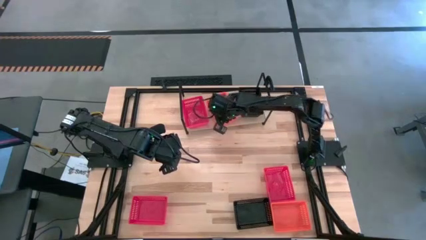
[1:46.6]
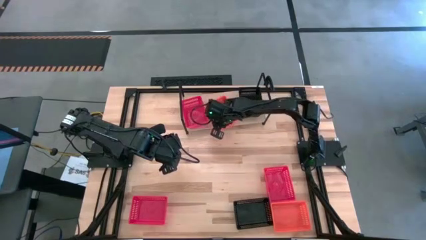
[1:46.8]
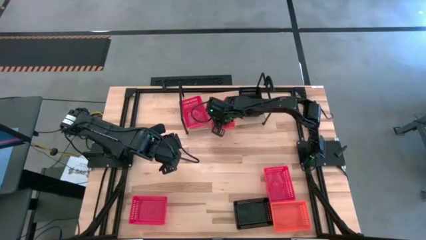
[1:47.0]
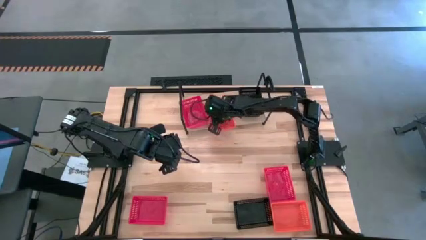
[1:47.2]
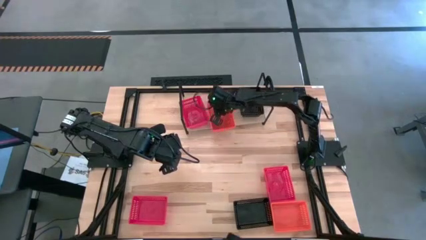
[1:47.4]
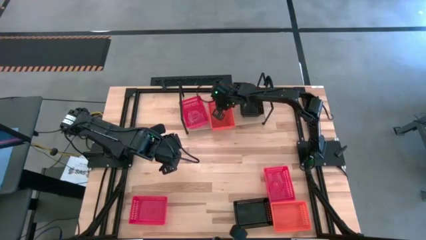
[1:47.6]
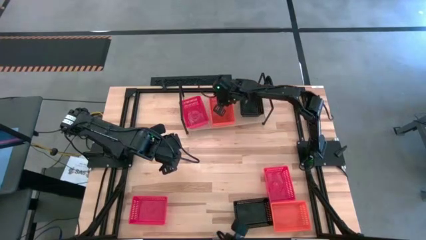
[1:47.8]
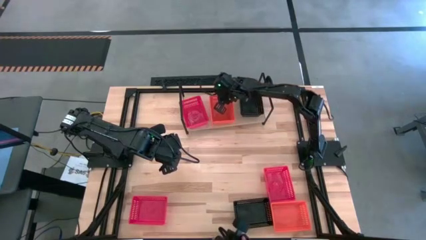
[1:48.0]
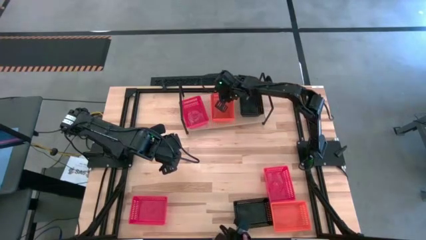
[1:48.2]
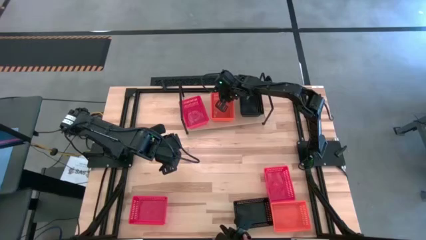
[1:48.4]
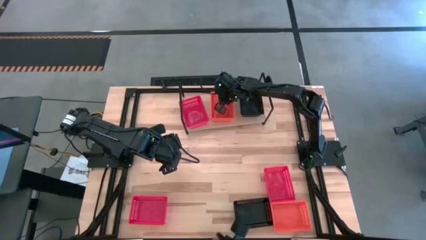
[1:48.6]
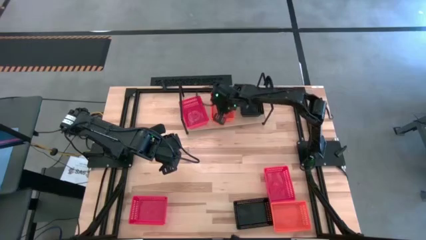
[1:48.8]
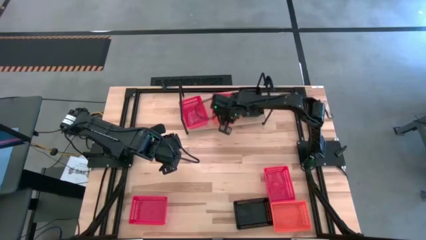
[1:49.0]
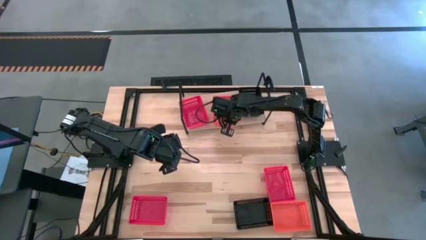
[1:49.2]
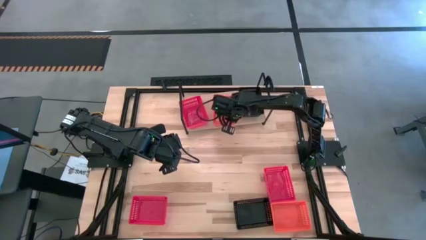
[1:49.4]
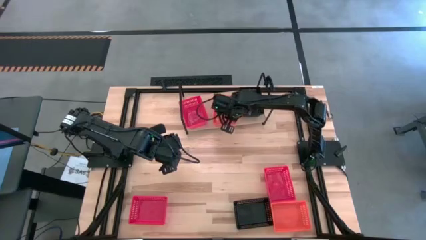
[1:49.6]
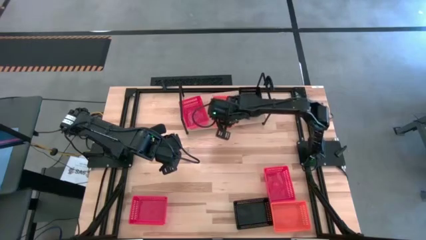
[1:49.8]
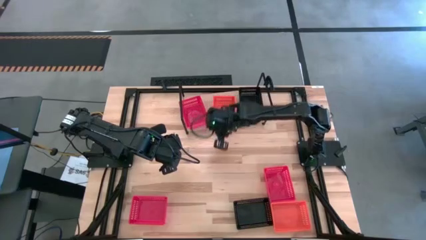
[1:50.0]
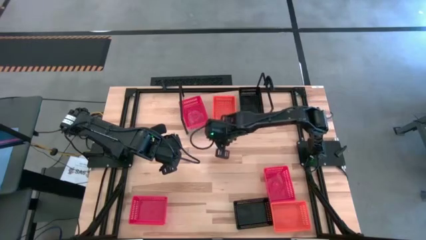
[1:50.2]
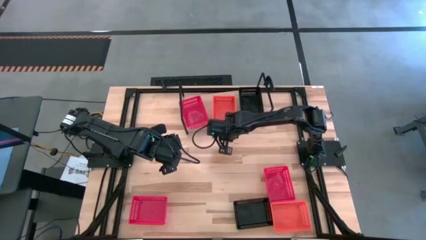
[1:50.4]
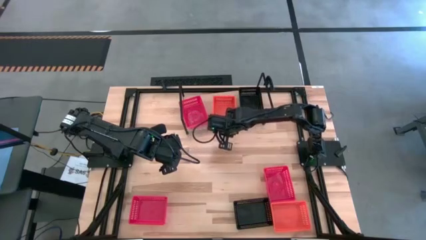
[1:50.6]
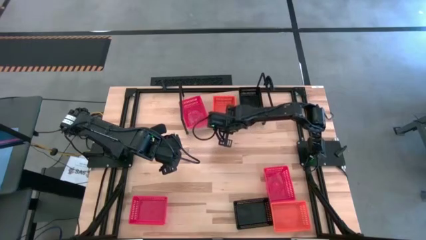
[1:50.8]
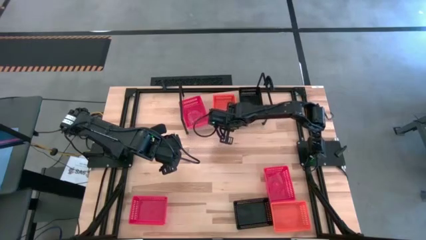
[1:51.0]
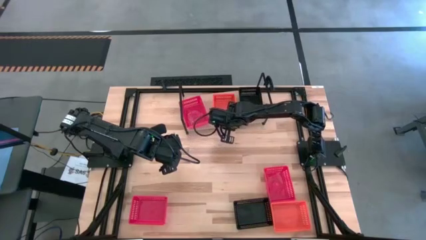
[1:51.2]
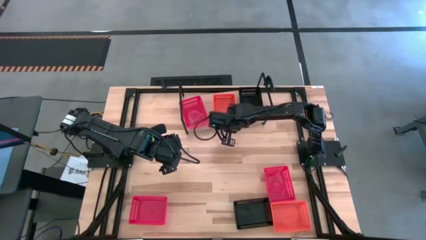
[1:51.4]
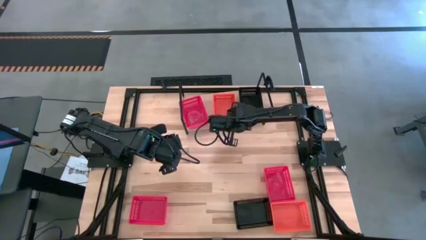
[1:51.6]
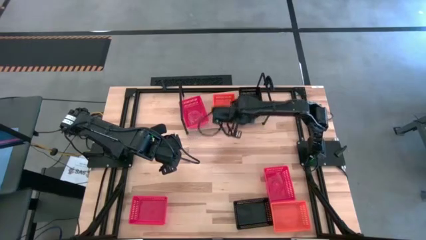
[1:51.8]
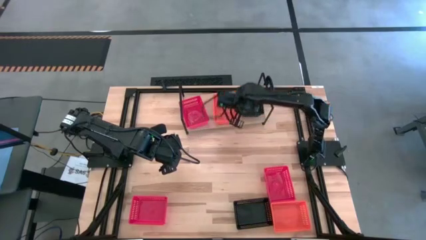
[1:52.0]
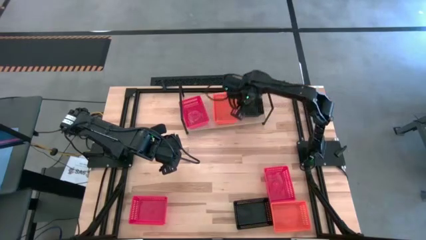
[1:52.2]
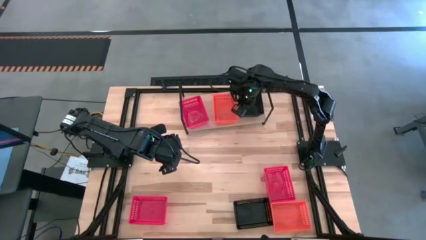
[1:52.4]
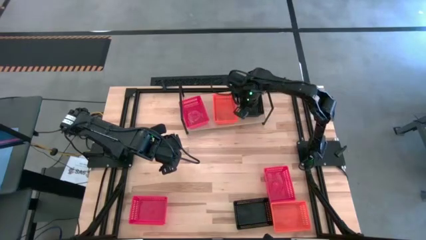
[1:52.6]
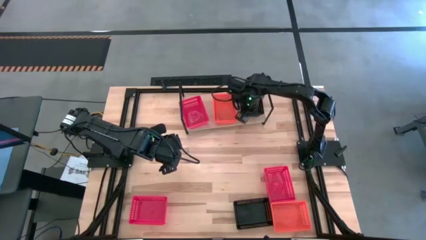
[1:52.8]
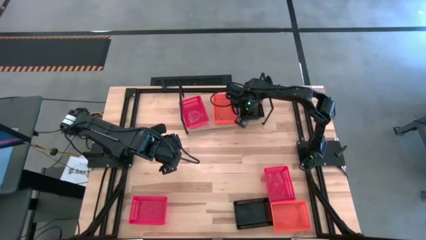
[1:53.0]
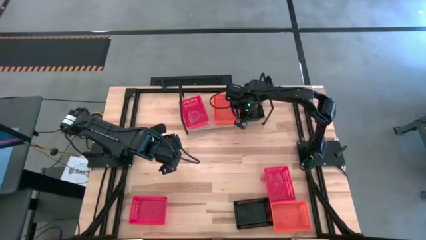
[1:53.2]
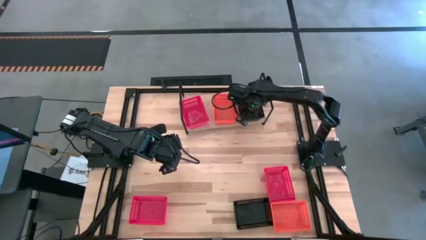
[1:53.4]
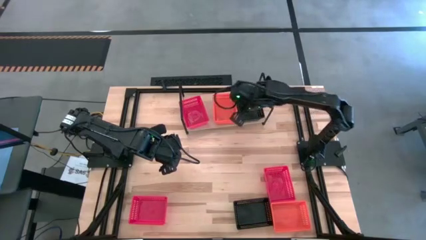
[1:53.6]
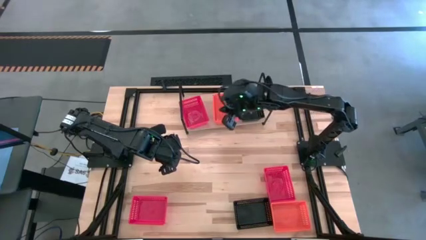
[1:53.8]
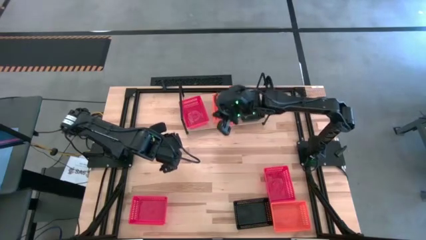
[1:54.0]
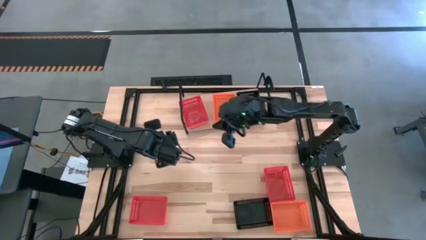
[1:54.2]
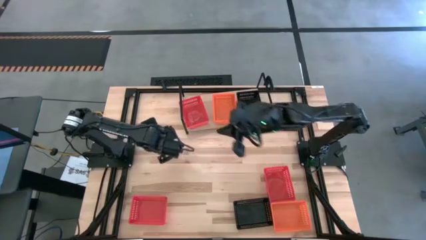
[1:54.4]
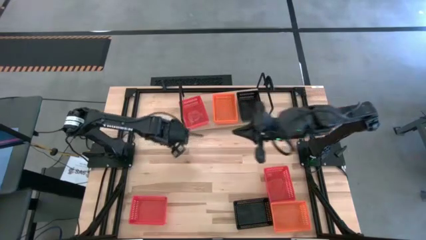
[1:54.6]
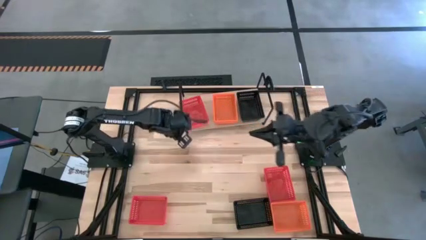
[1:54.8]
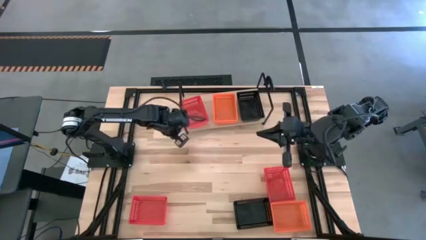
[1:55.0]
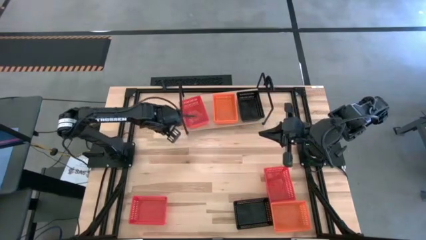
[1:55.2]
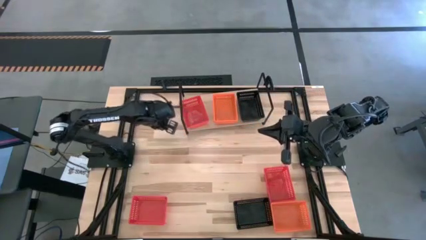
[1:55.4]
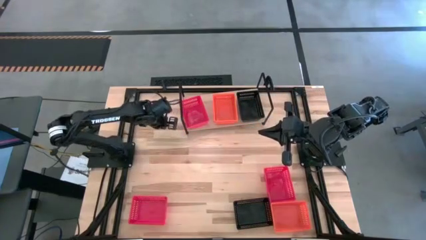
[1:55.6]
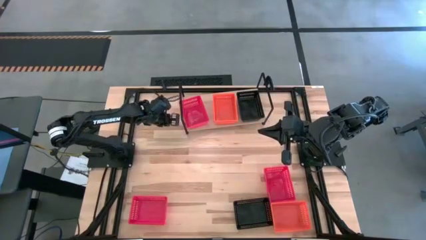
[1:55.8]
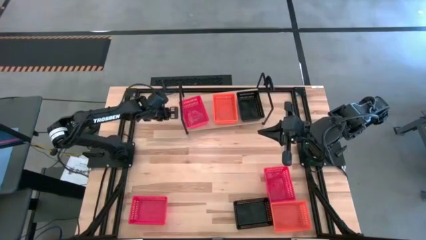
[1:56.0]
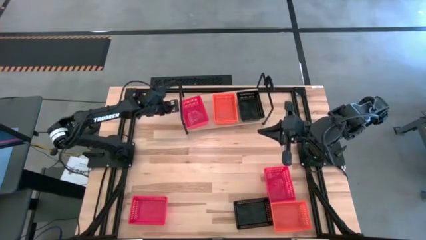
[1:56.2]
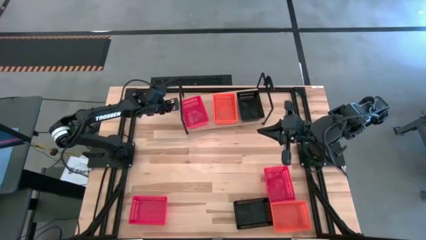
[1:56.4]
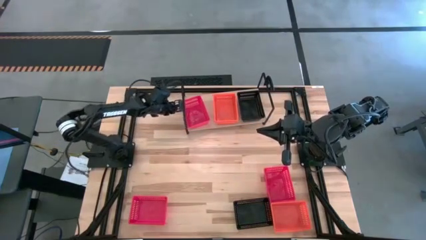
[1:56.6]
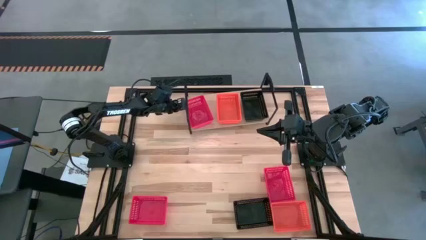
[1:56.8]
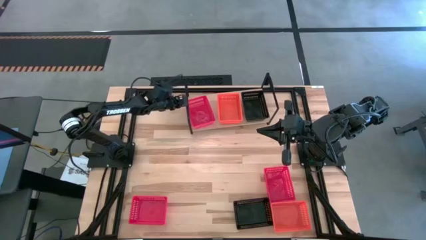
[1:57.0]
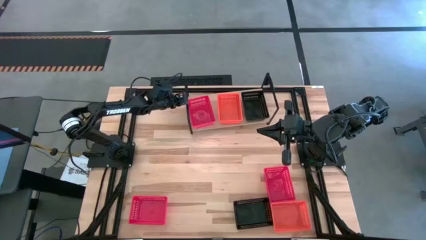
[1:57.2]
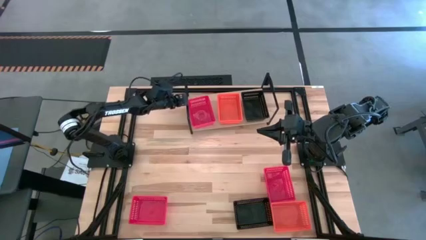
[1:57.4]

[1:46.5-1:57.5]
Task: Stack baskets on shelf by color
Adjust the bin on the shelf
